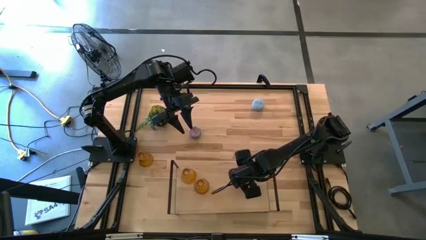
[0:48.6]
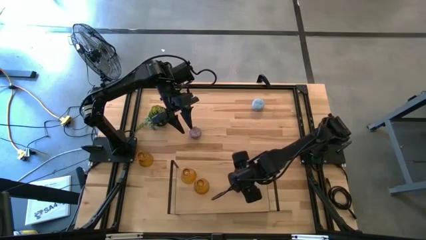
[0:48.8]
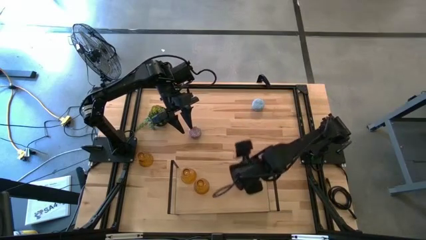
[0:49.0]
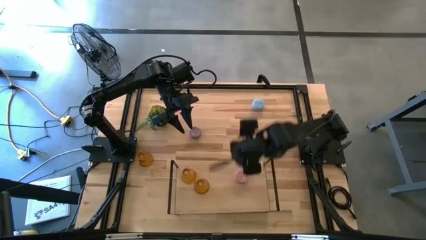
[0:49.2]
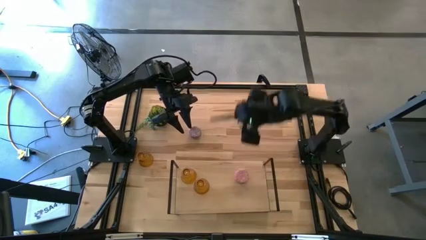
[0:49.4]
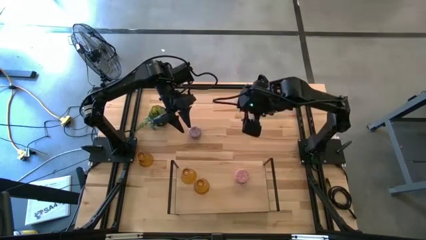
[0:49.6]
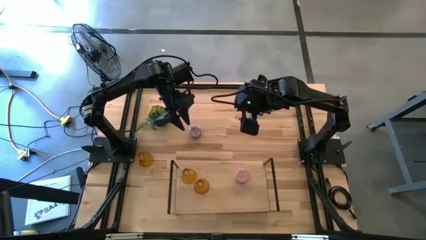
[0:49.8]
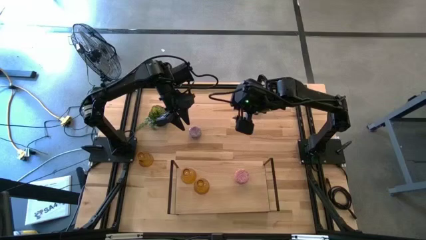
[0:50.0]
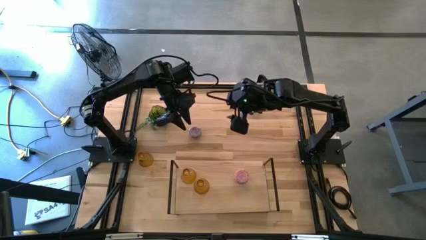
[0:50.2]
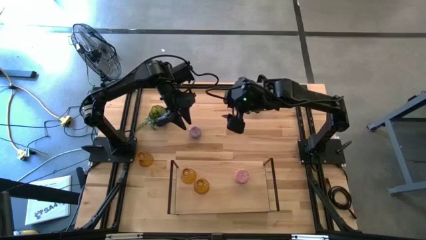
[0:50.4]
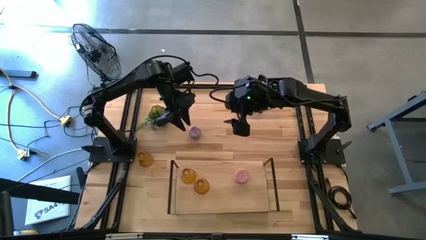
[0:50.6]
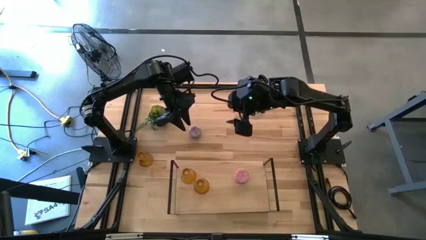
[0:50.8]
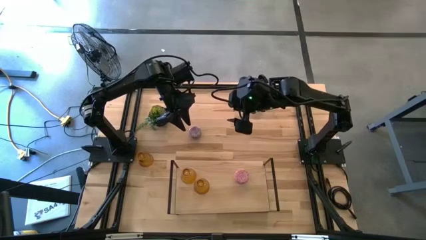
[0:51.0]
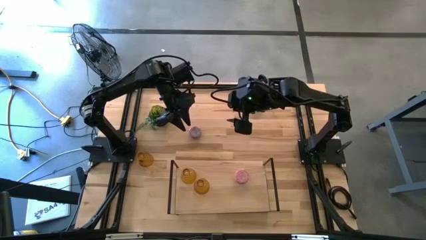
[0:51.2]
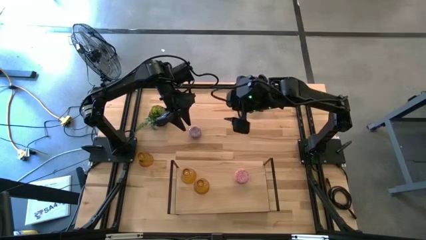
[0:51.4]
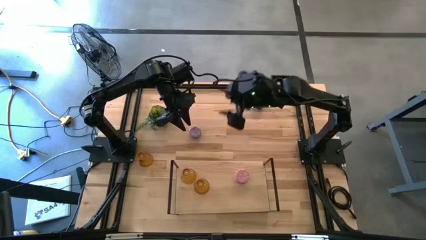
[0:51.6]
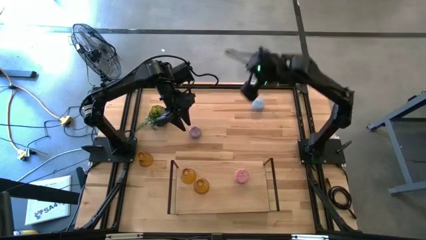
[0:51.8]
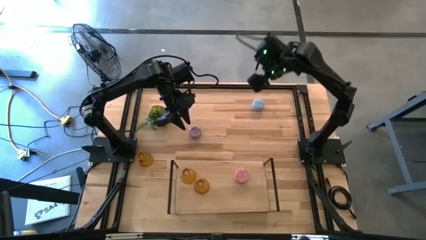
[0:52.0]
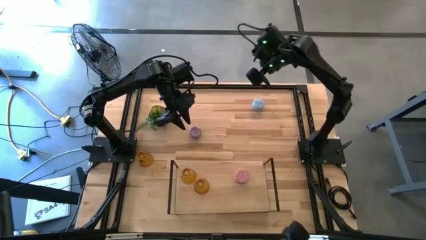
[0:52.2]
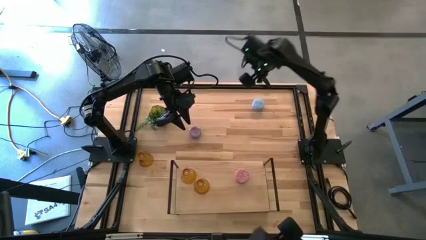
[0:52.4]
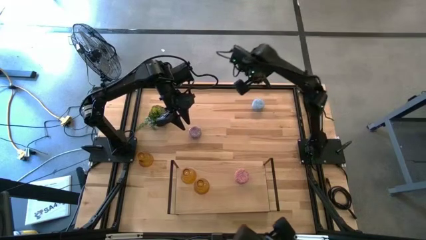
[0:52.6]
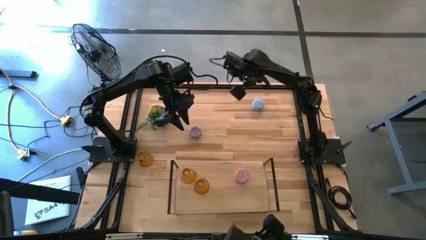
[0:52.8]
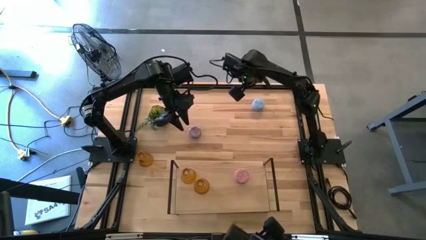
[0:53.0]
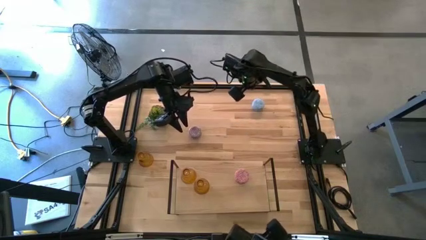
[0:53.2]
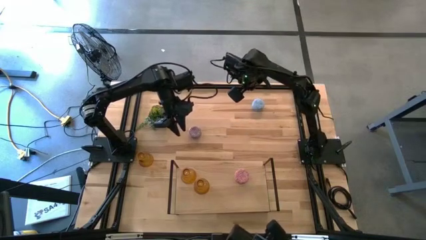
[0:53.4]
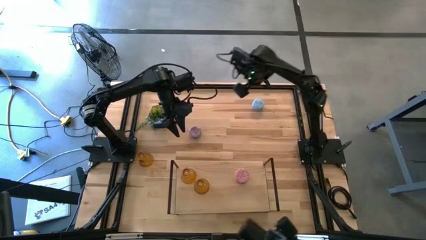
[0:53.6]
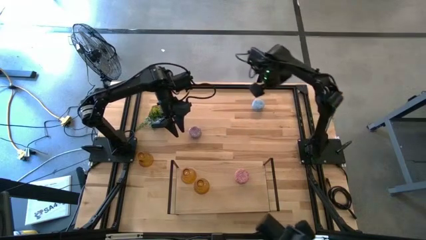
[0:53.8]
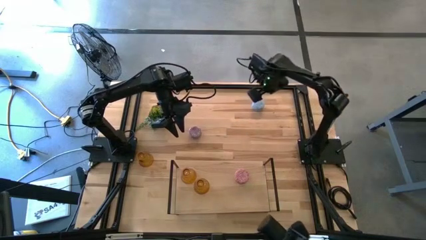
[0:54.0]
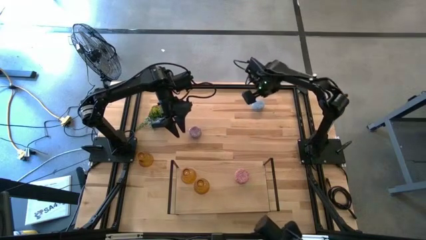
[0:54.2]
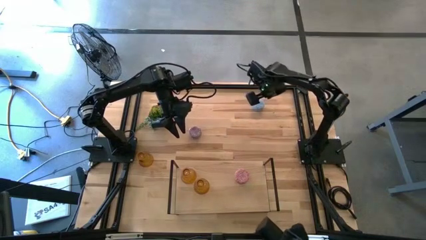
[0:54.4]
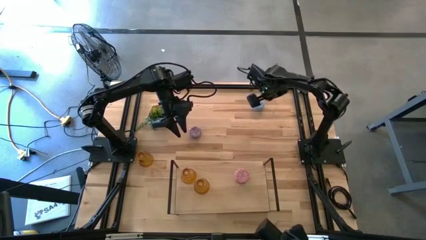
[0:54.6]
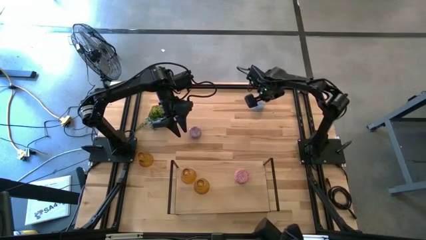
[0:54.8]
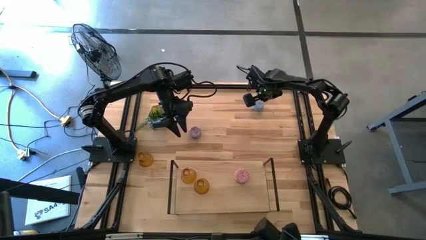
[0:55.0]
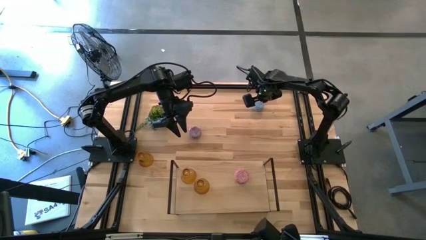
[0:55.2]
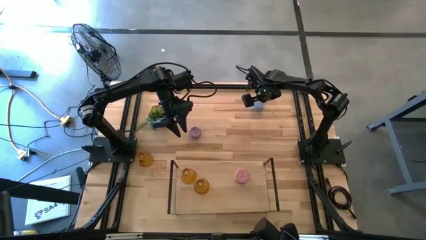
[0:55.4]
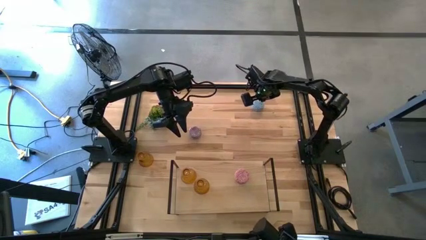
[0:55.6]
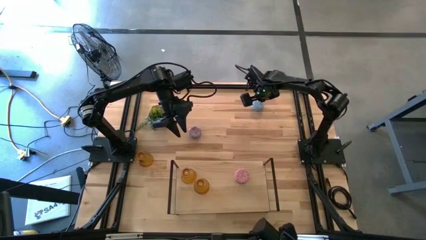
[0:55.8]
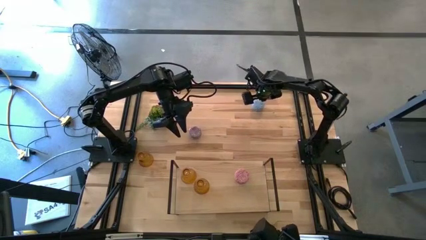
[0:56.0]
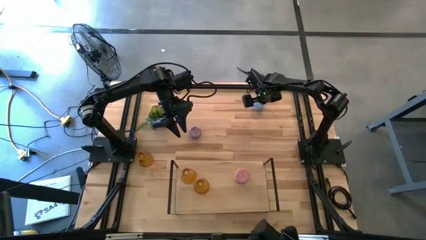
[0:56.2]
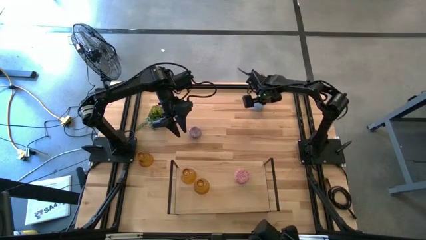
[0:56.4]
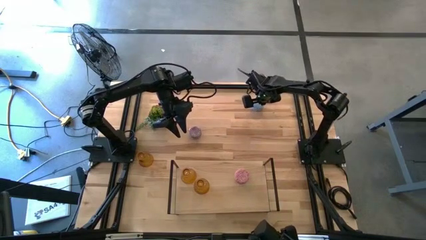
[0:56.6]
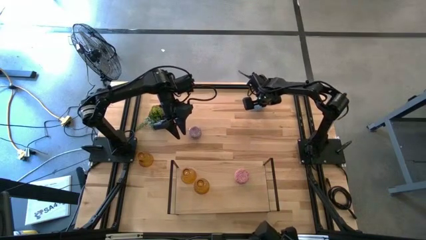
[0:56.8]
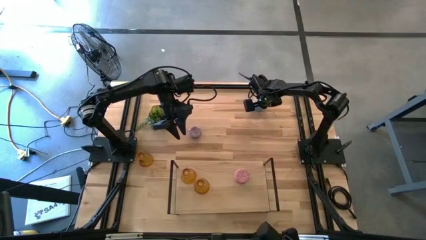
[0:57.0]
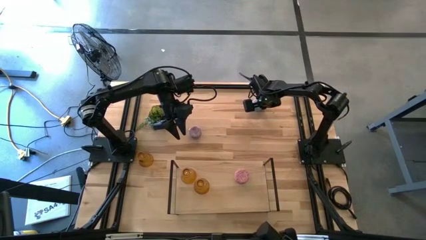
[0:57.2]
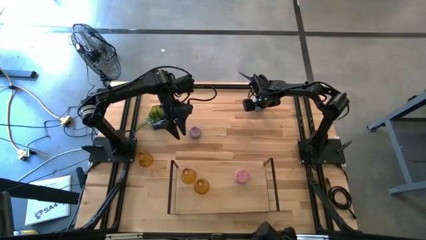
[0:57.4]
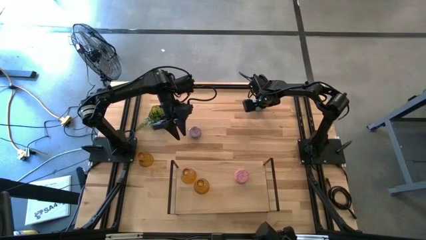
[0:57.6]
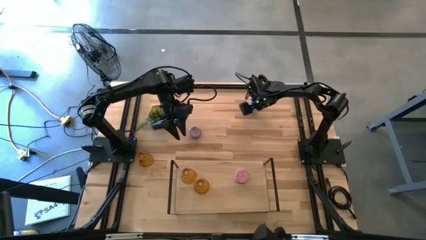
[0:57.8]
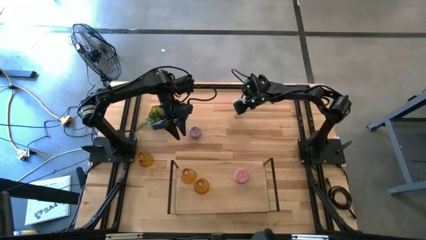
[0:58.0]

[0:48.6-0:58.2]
Task: Pick & Place candle stick holders
Put the light blue scented candle on the shelf

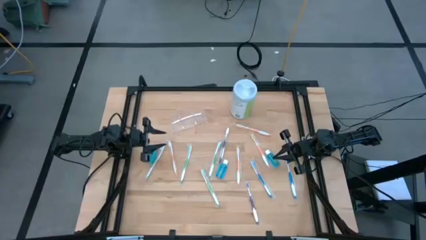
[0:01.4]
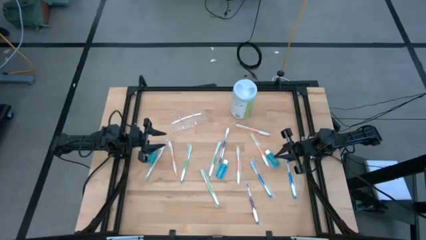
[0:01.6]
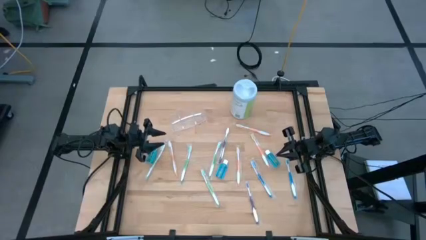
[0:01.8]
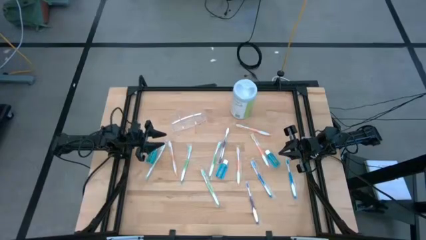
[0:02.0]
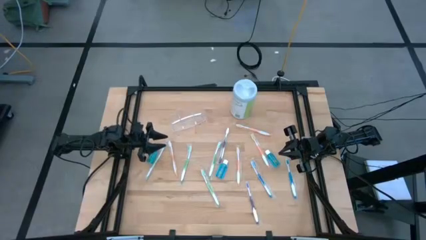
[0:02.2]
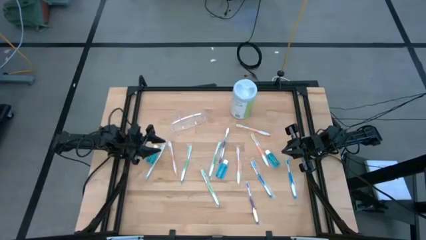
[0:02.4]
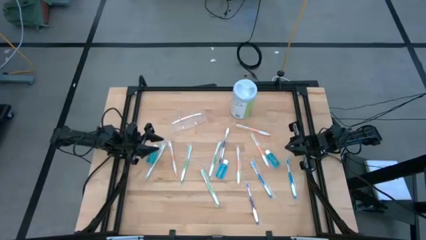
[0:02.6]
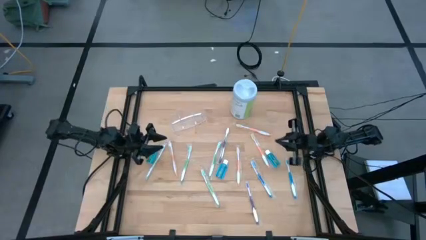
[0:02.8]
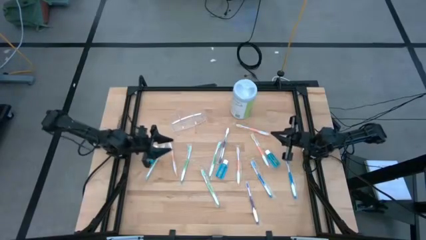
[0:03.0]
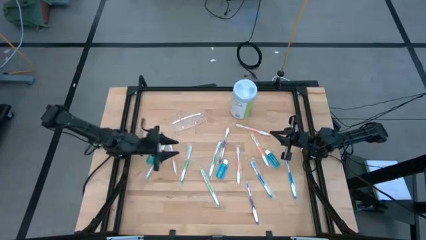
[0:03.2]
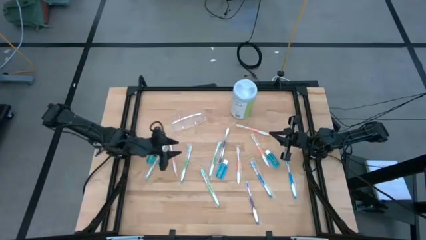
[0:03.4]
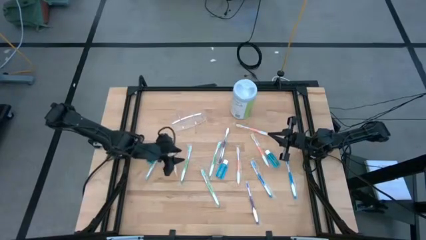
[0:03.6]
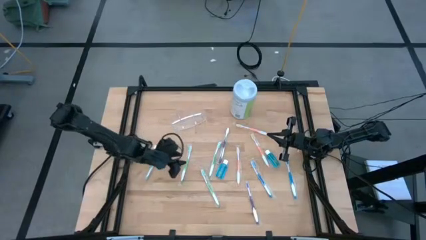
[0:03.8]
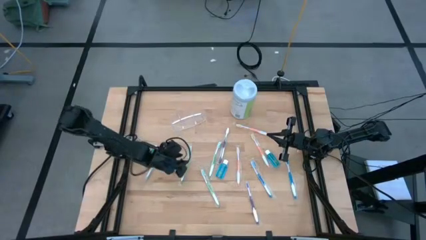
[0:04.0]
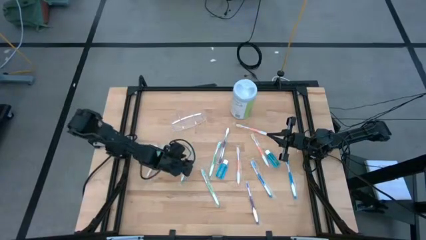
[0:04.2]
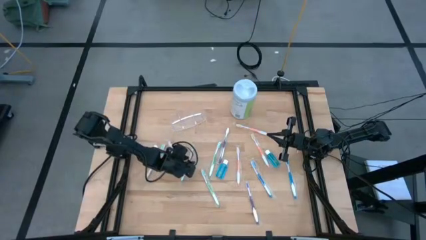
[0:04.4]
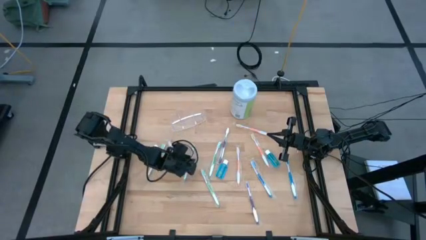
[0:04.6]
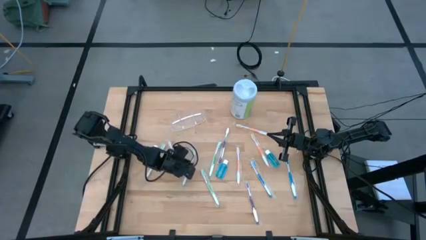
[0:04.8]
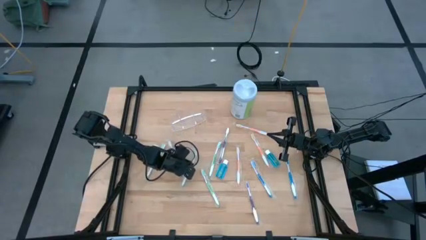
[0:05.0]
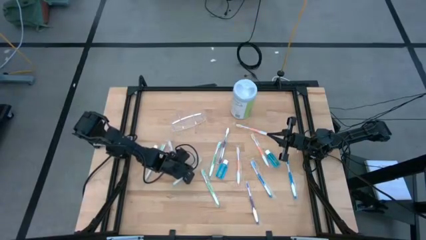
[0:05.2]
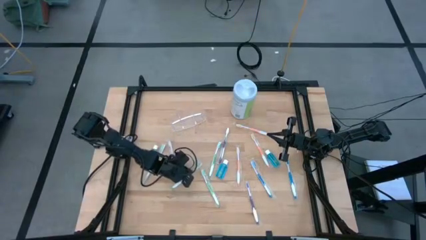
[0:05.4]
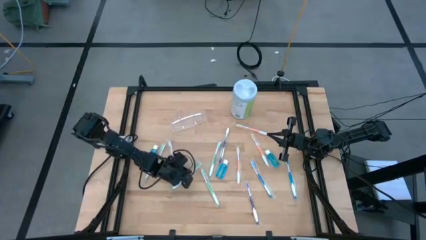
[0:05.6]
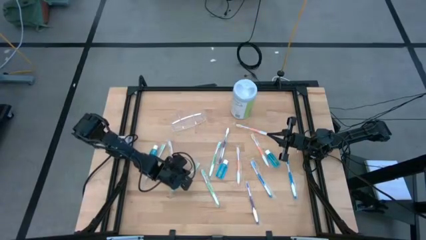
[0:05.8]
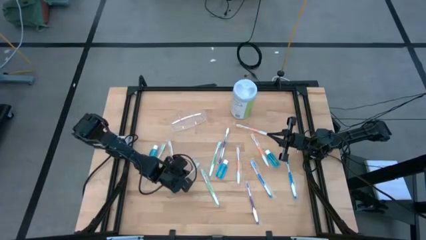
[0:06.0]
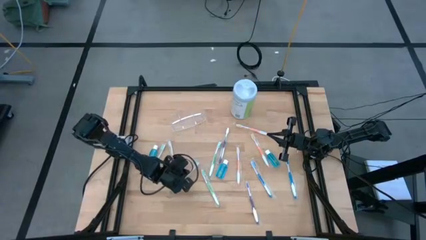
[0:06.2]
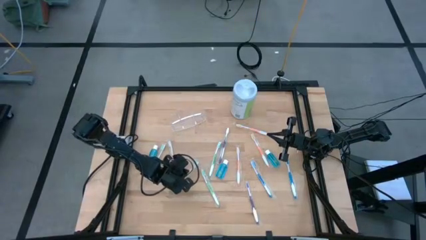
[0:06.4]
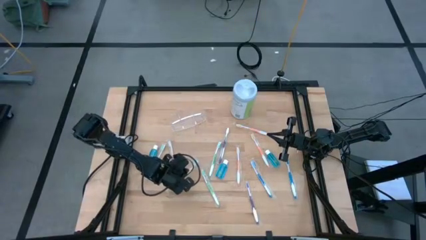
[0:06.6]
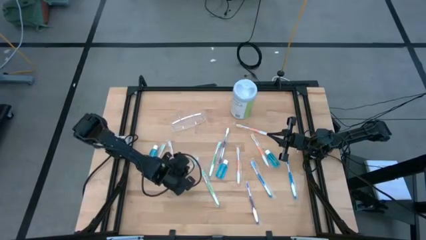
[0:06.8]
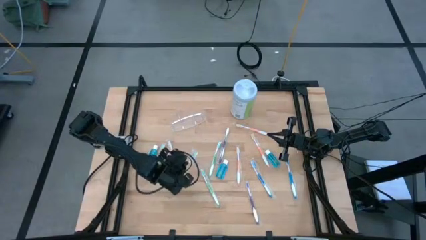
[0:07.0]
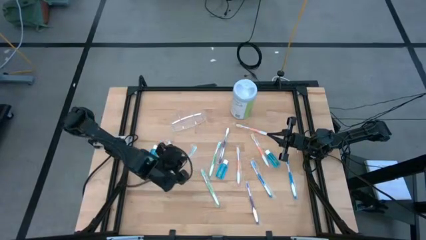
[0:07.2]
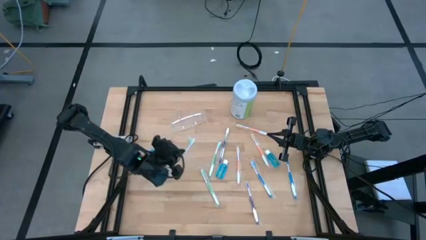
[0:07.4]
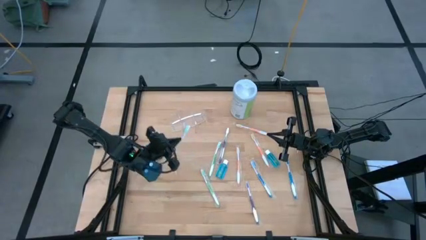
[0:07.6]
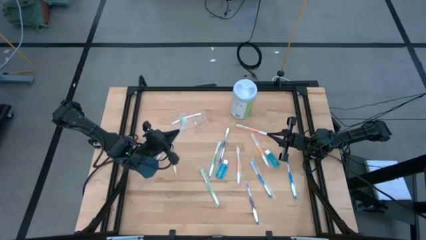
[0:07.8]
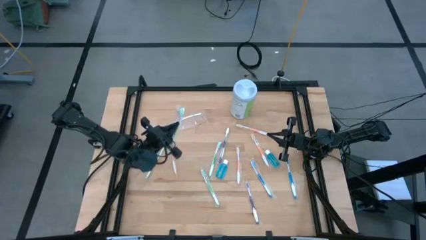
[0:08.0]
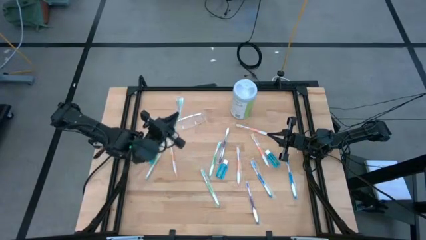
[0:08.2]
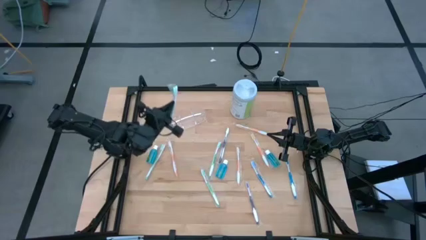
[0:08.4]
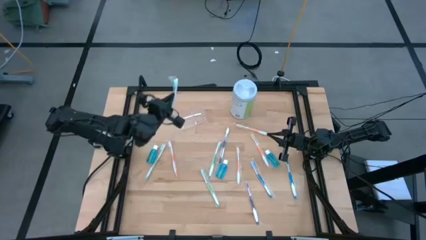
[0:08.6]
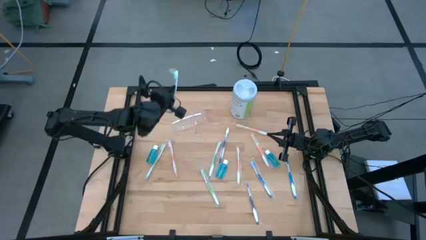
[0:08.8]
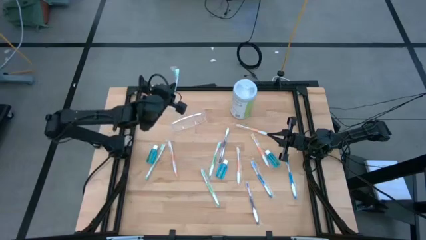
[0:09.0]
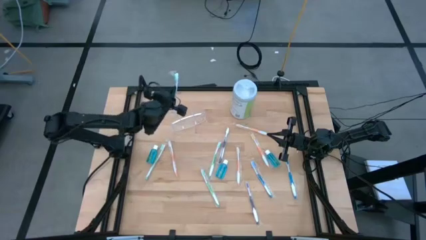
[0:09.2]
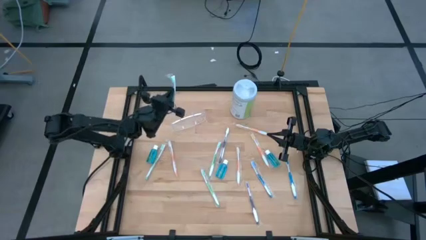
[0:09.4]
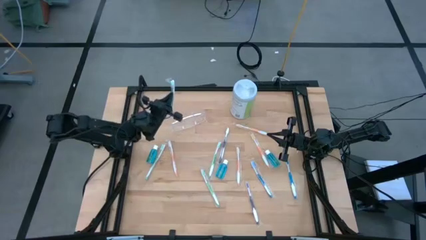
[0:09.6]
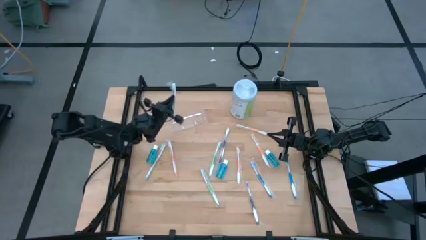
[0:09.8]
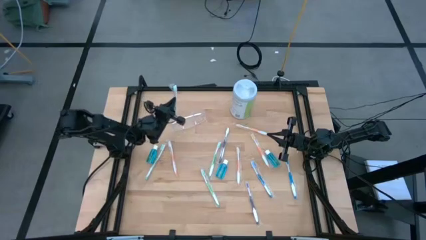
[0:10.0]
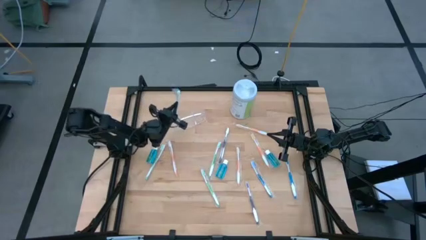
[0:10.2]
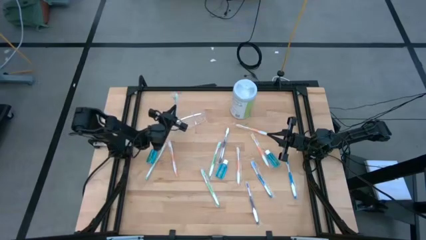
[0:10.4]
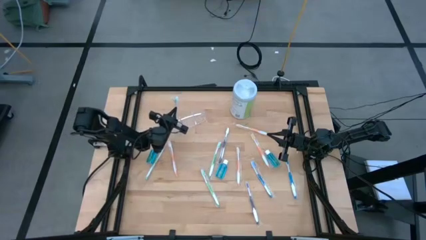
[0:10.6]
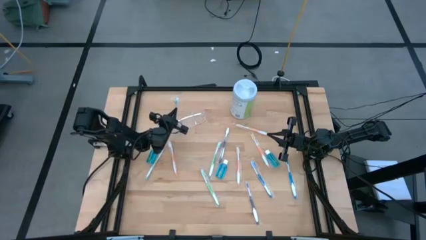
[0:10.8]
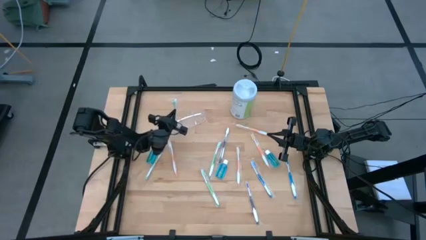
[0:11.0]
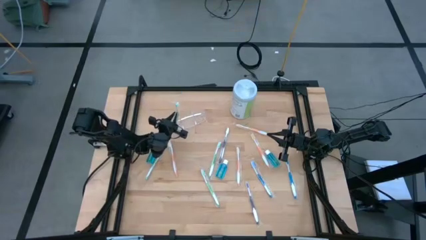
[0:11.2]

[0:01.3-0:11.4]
Task: Pick & Place toothbrushing station
Put the green toothbrush into the transparent organizer
